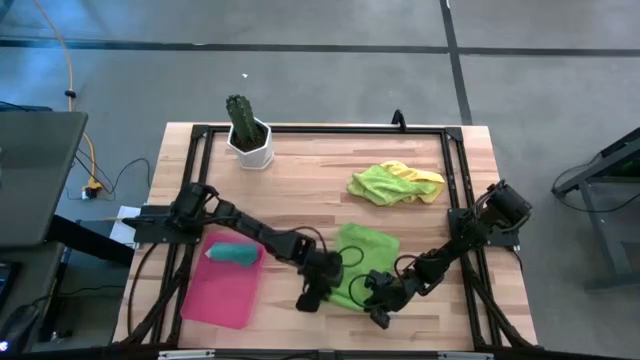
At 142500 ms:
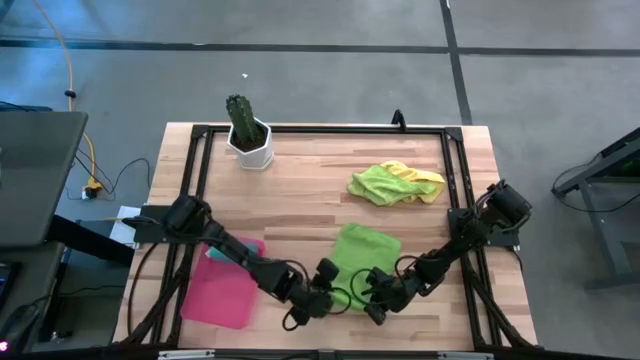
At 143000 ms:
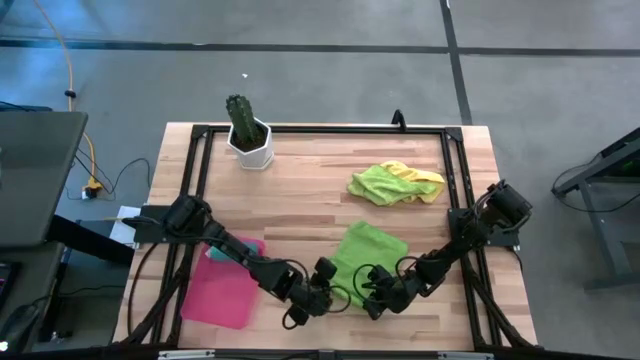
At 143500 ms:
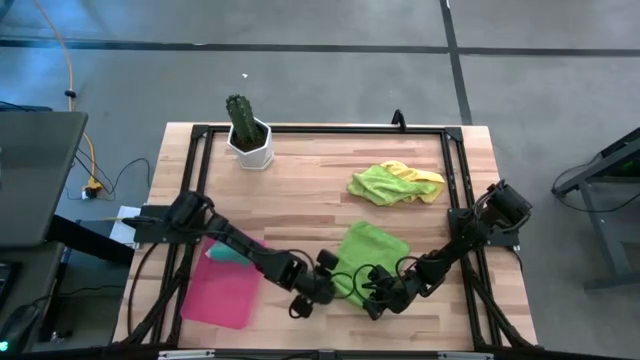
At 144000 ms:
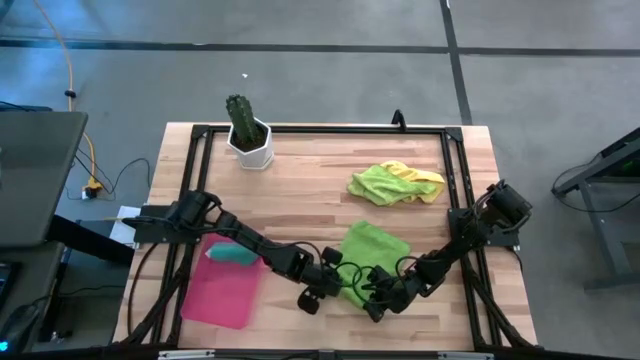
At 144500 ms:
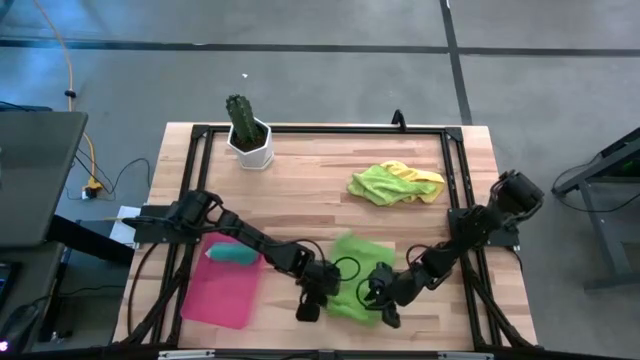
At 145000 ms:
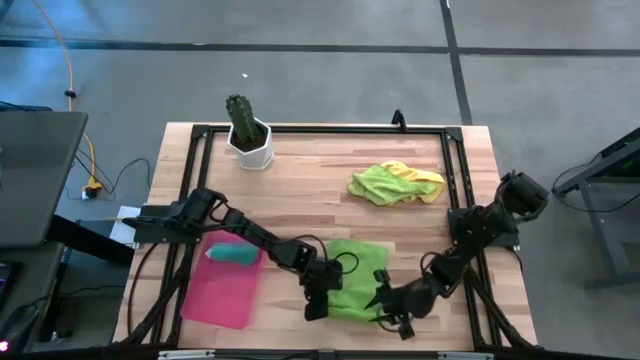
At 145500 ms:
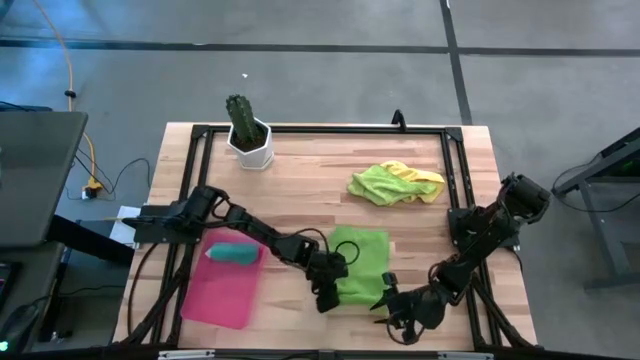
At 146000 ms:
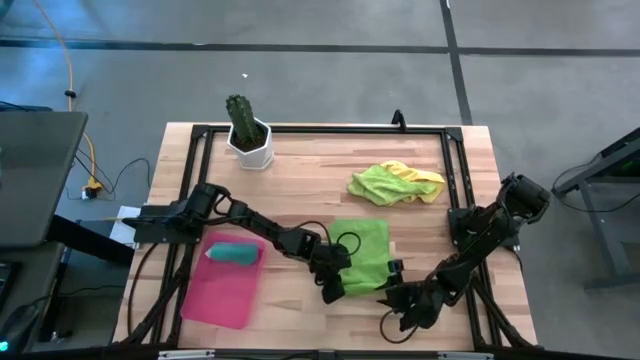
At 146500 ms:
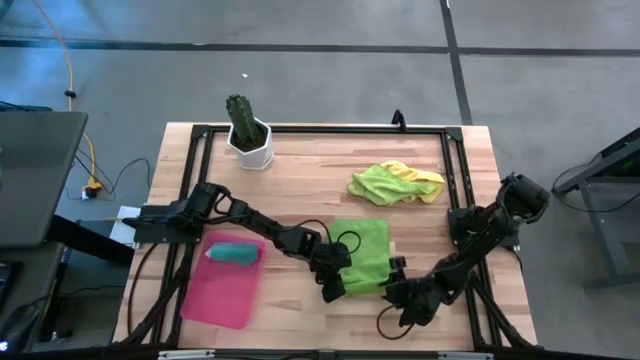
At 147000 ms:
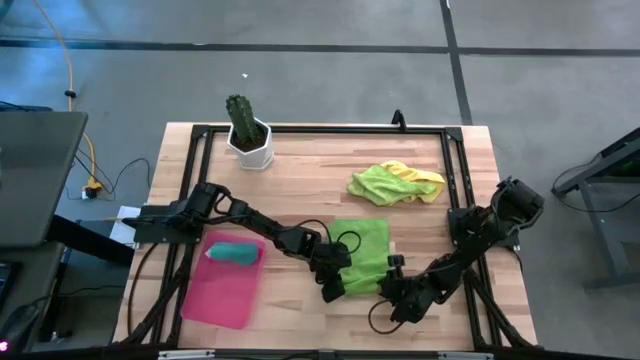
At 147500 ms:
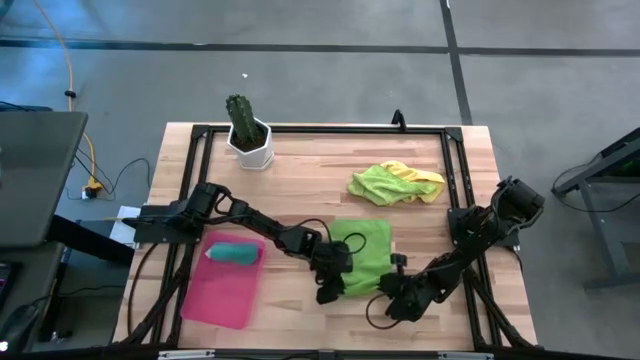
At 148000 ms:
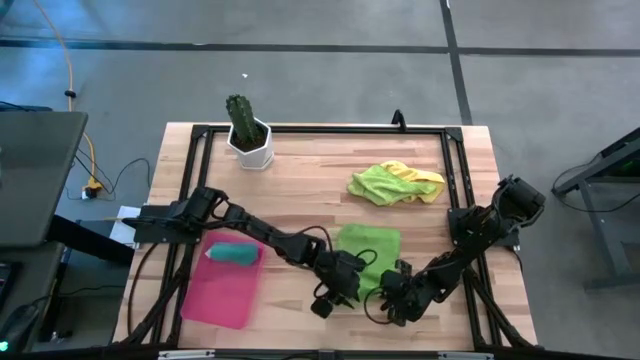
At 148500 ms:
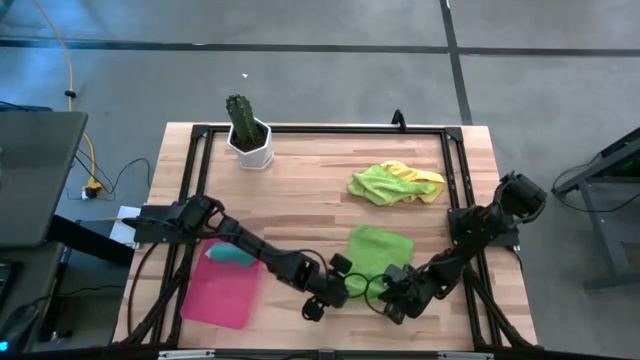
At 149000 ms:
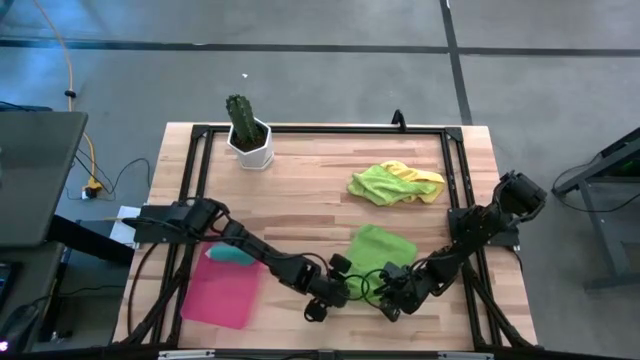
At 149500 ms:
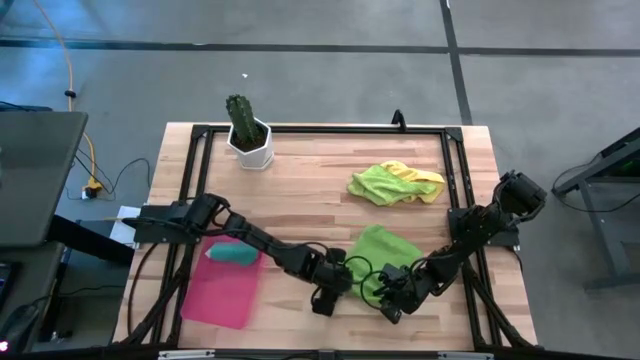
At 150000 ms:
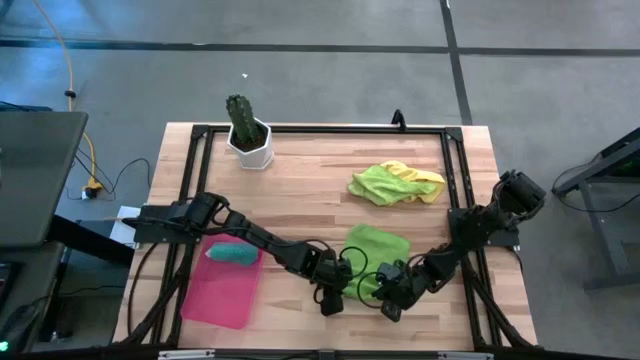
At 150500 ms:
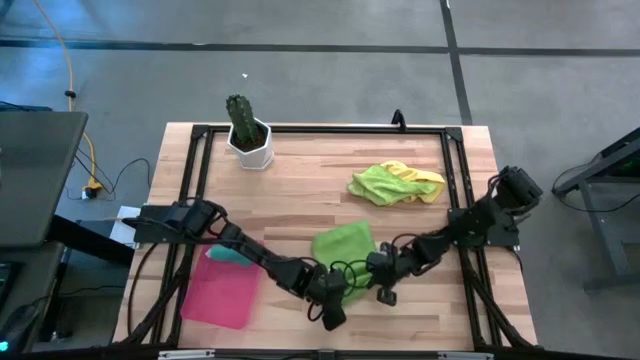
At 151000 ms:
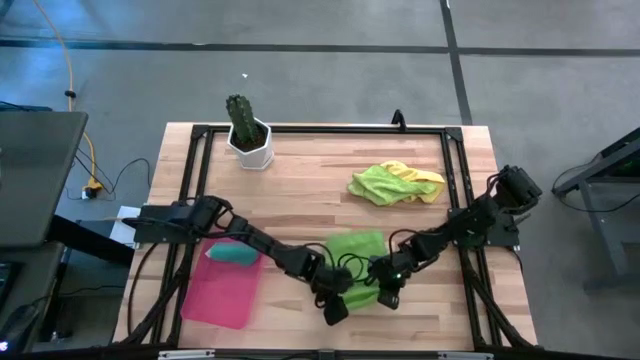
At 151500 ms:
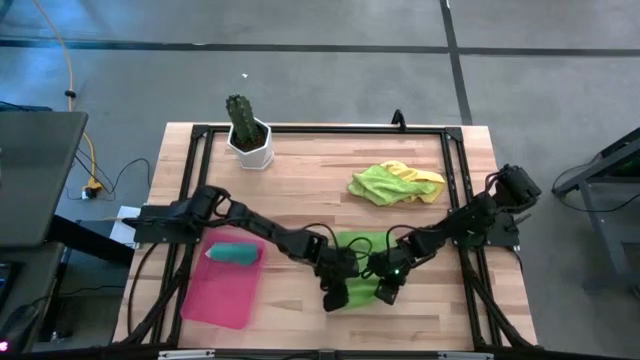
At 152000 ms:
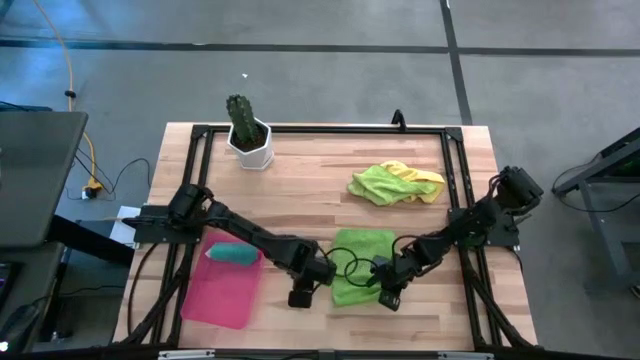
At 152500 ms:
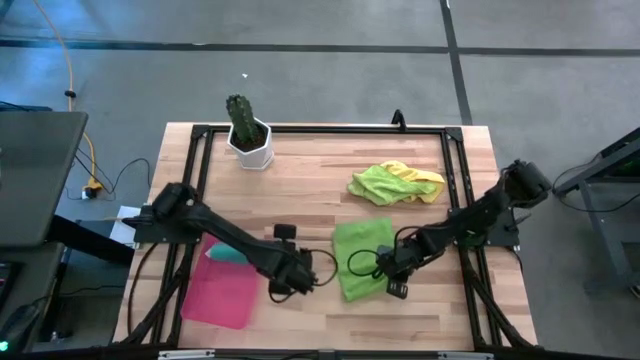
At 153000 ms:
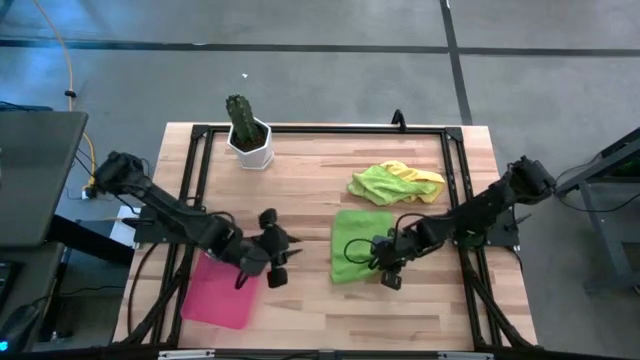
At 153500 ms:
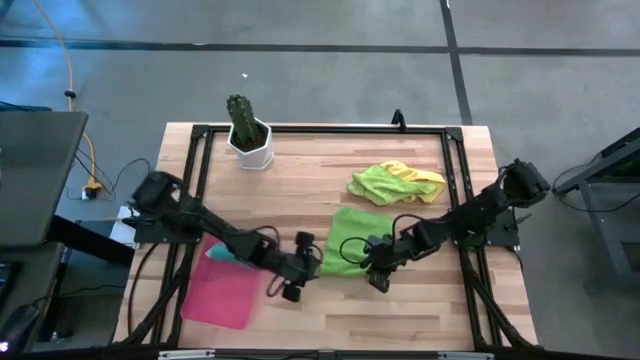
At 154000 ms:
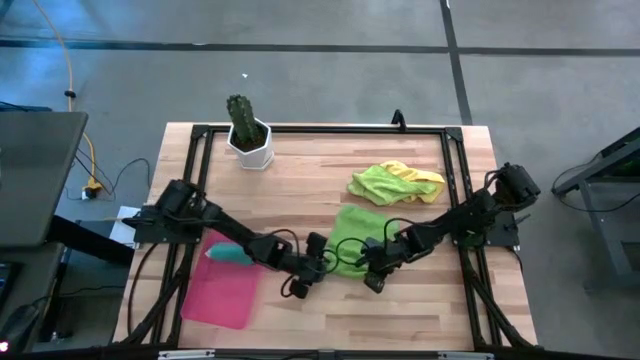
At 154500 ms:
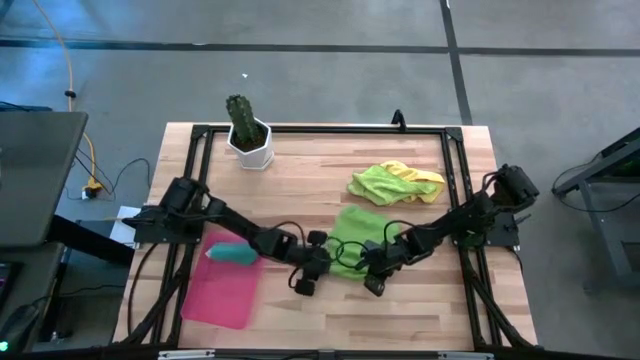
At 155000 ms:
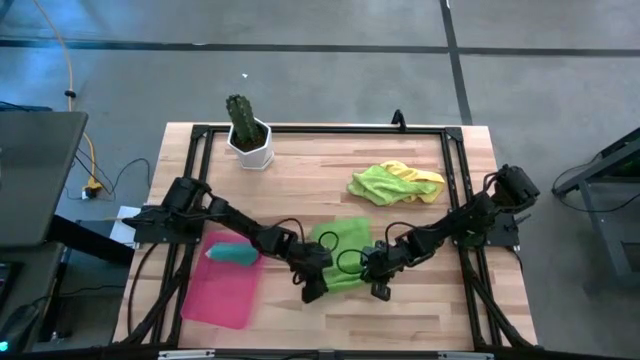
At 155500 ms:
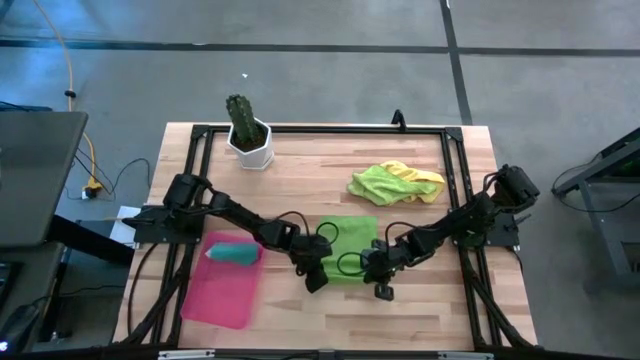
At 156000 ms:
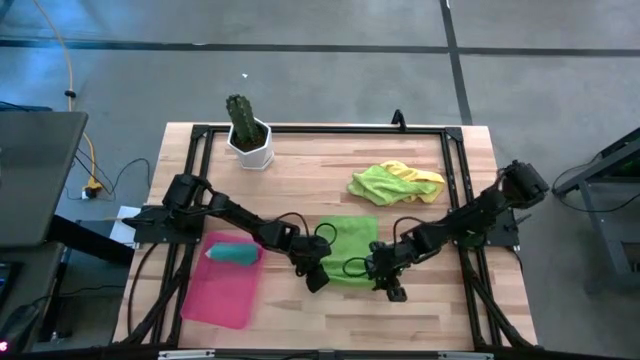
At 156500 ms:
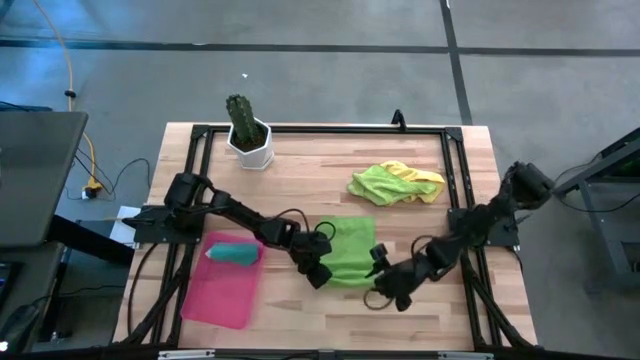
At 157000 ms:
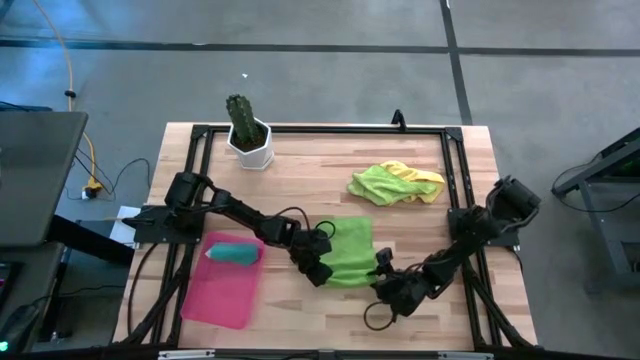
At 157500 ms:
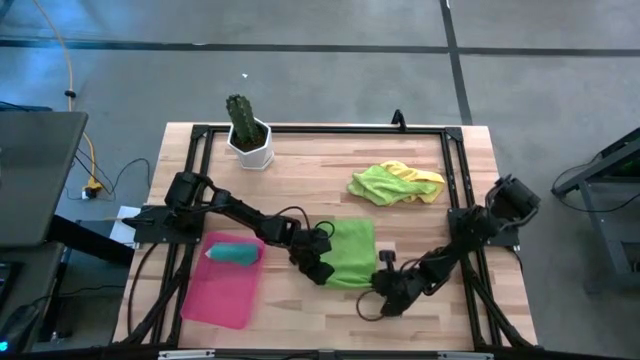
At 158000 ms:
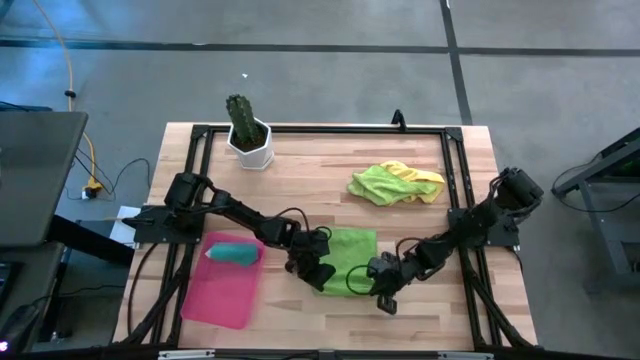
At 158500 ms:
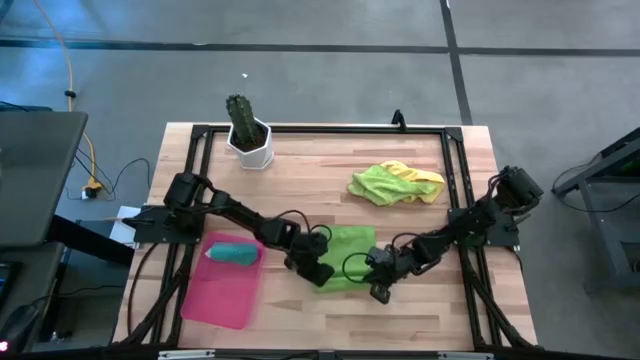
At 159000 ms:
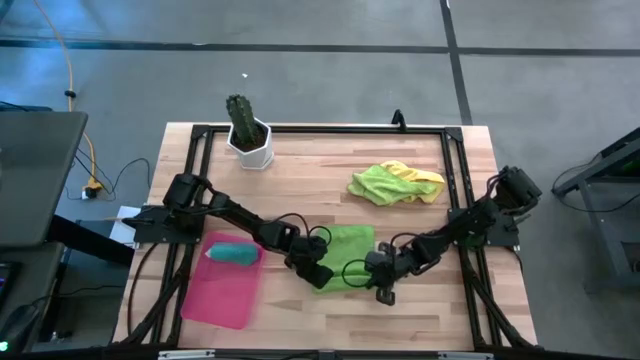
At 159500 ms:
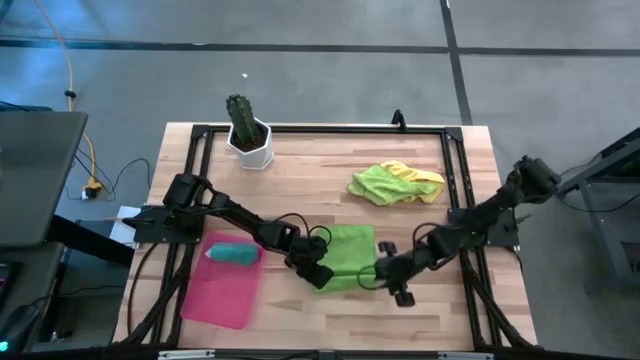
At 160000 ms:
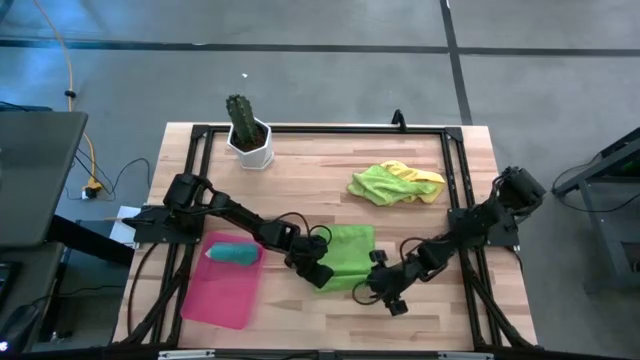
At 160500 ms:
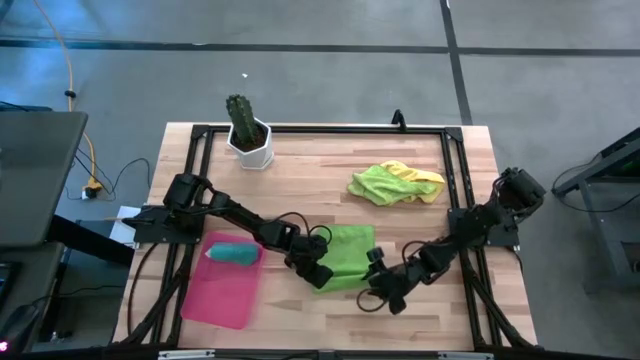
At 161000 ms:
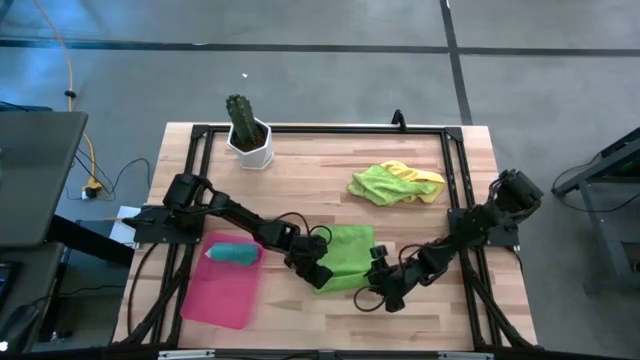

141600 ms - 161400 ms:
Task: Roll microfiber towels into tight, uniform cylinder then place into a basket
Roll the dark green towel
